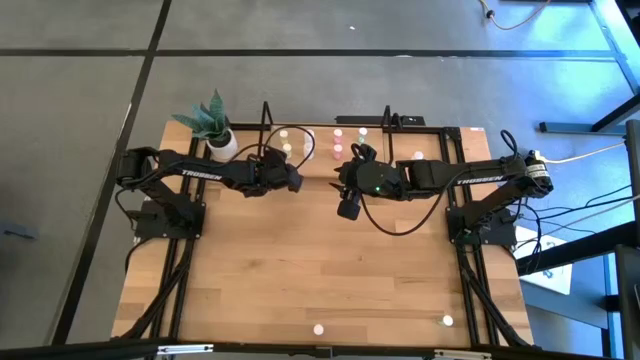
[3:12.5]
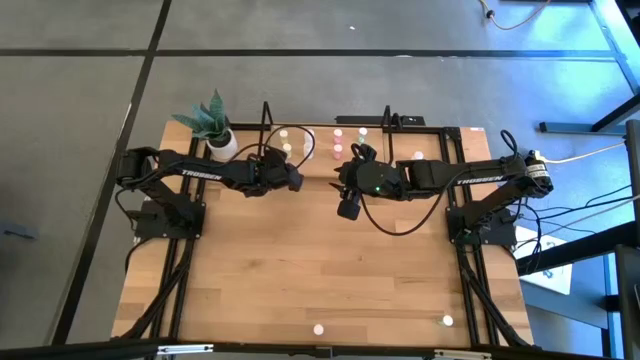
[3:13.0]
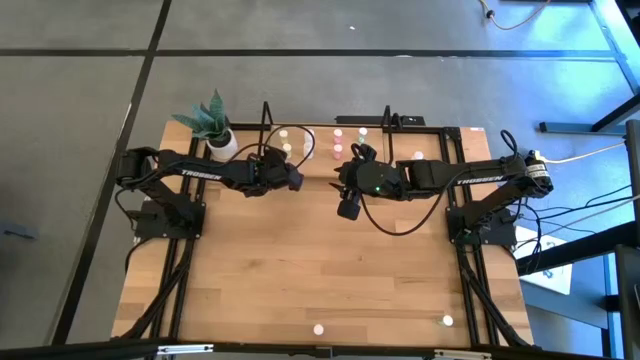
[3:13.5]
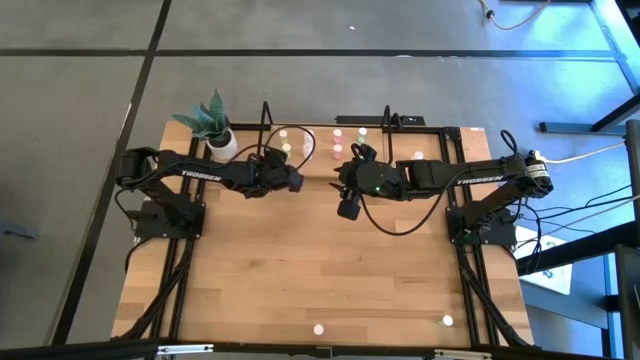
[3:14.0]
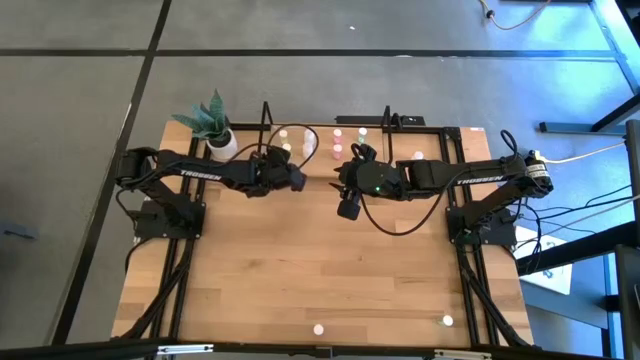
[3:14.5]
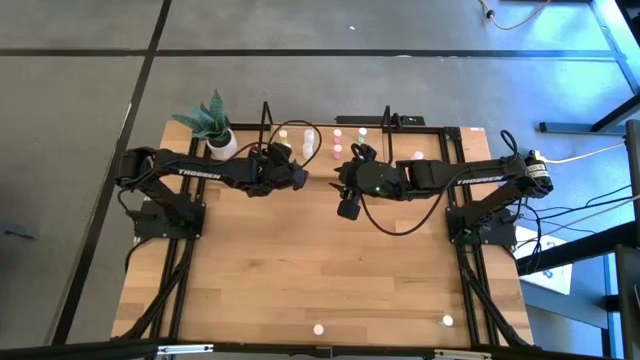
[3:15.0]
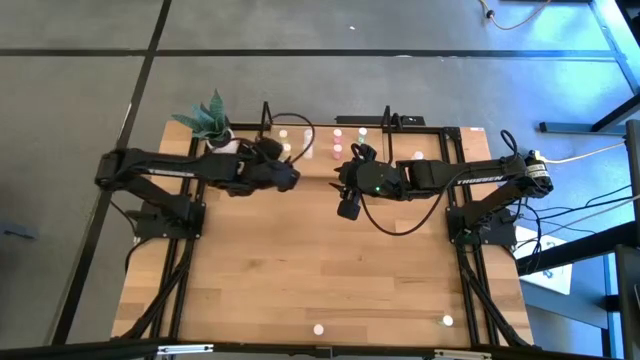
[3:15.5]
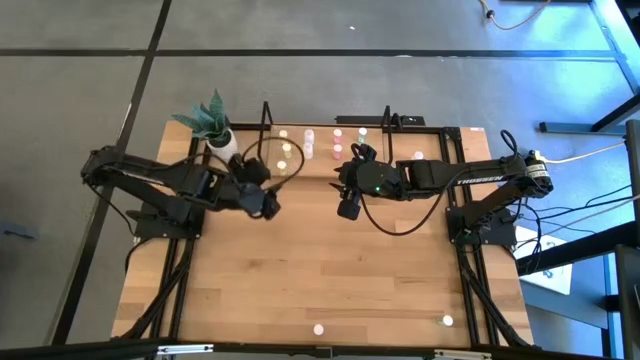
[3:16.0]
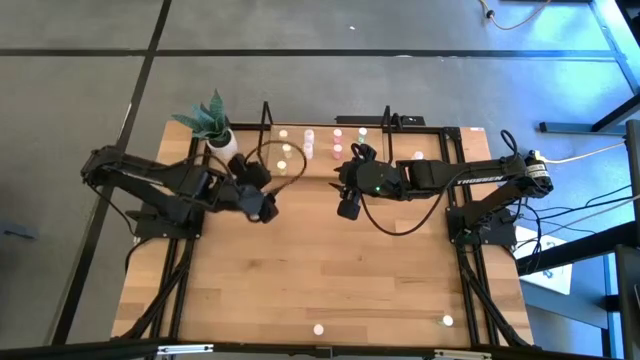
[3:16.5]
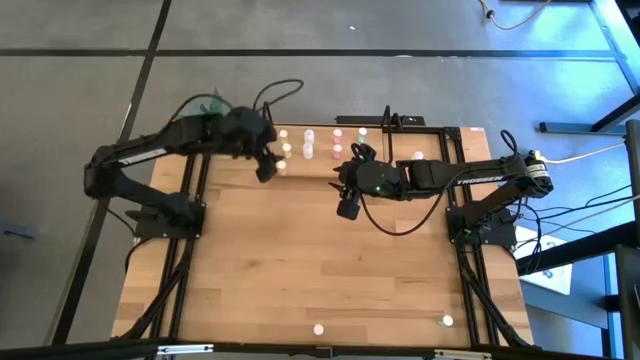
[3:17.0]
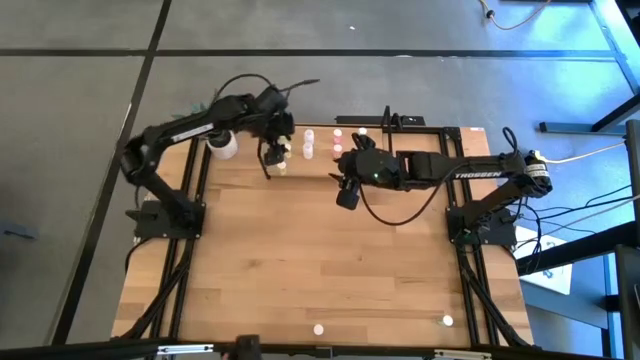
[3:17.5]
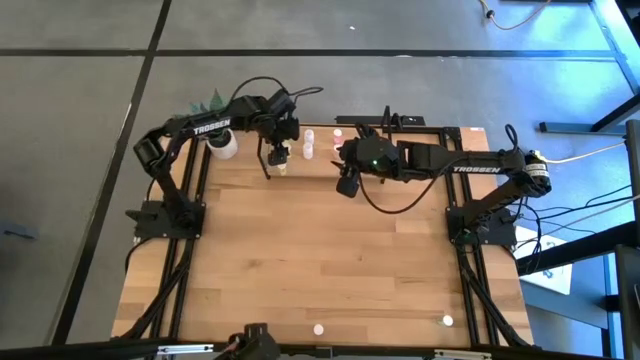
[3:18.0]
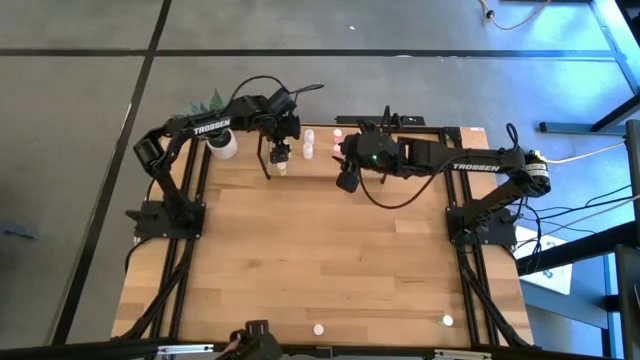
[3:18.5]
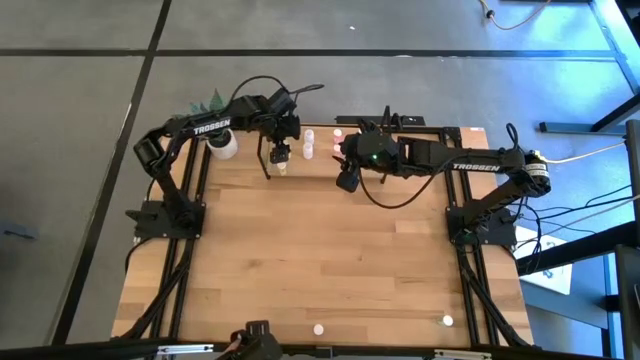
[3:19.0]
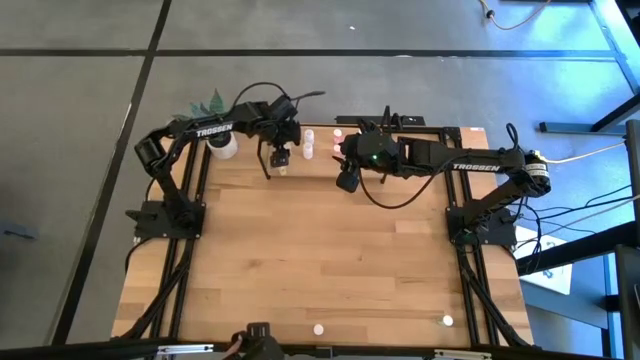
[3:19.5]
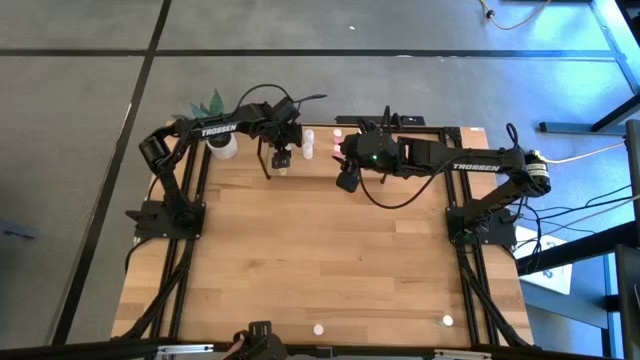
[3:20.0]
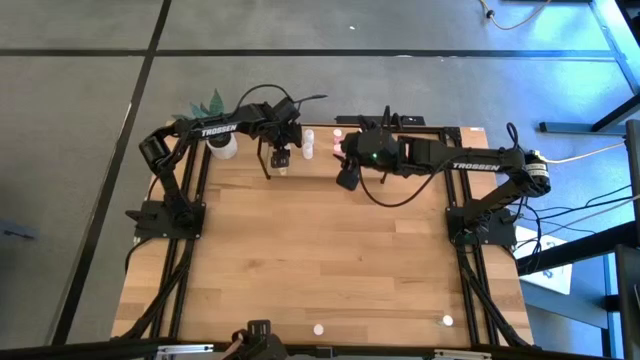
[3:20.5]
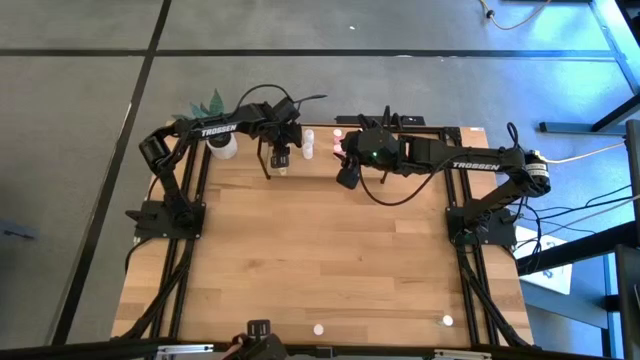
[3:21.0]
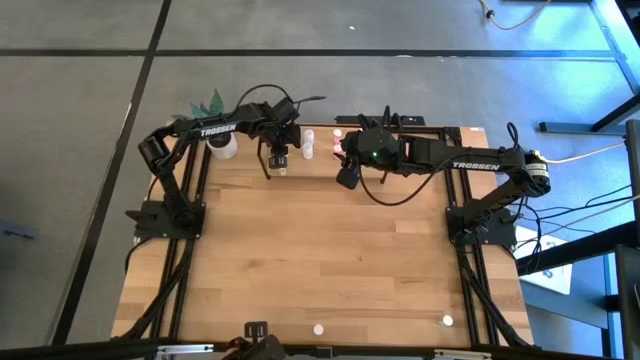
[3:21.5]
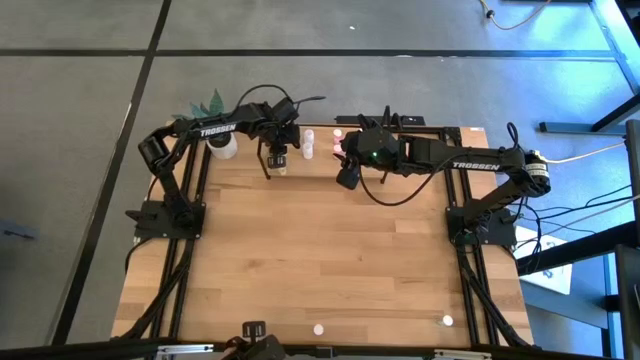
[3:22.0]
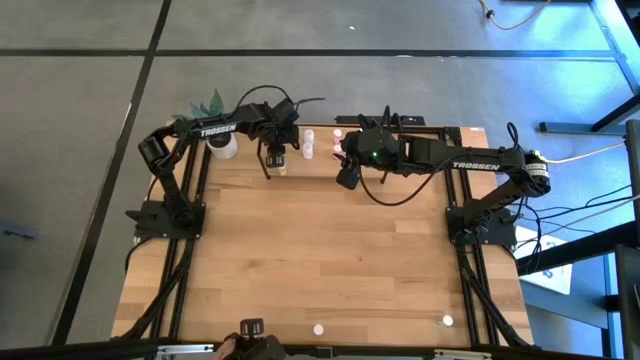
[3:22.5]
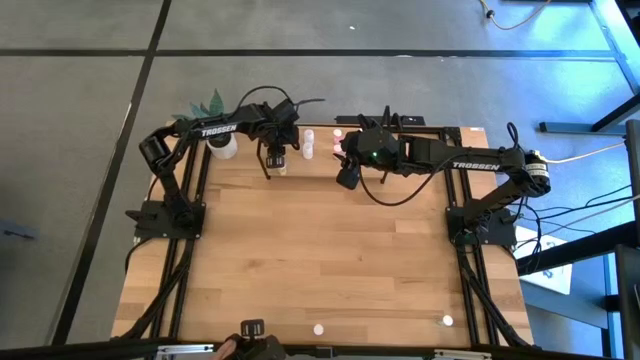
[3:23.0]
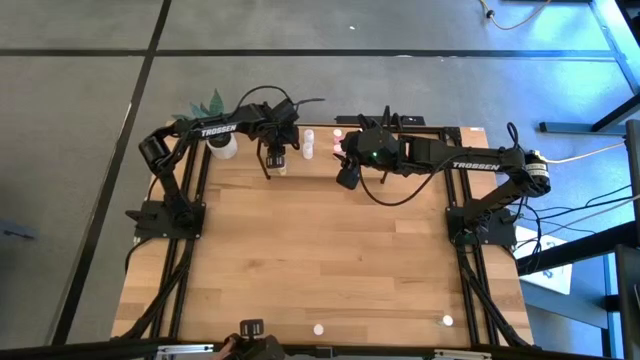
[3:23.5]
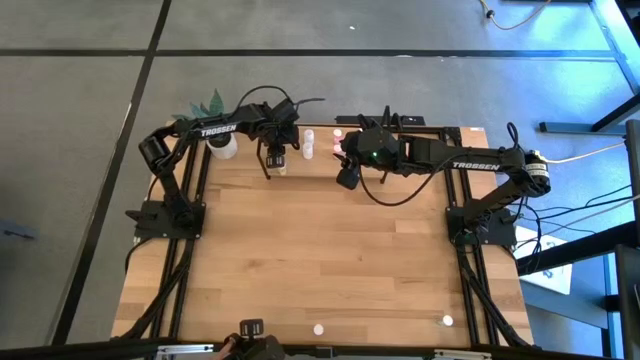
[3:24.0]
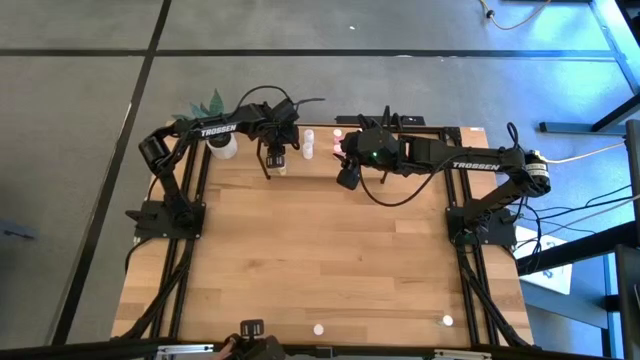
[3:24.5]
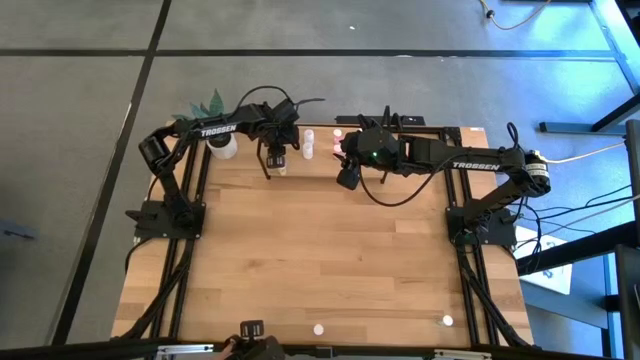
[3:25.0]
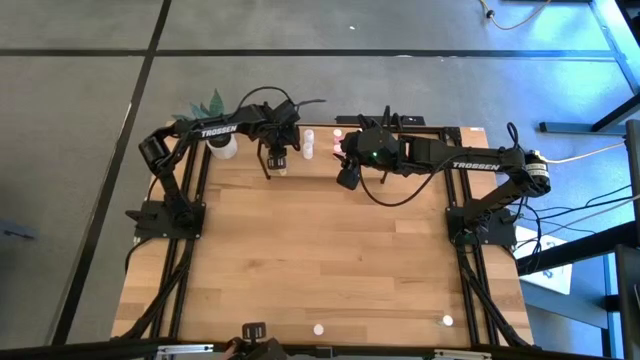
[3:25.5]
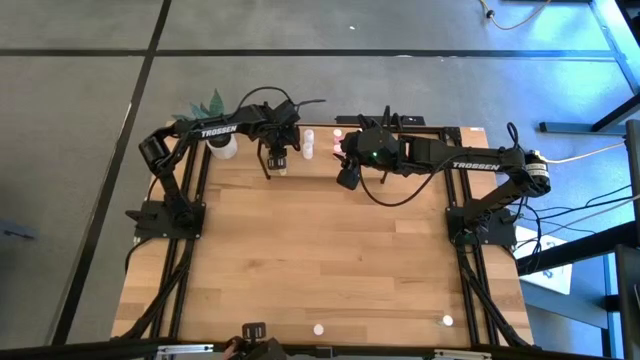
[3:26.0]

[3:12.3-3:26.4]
Task: Pick and place medicine bottles onto shelf by color
Adjust the yellow pill bottle on the shelf

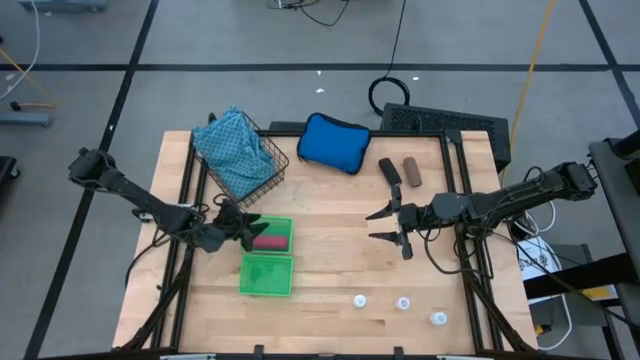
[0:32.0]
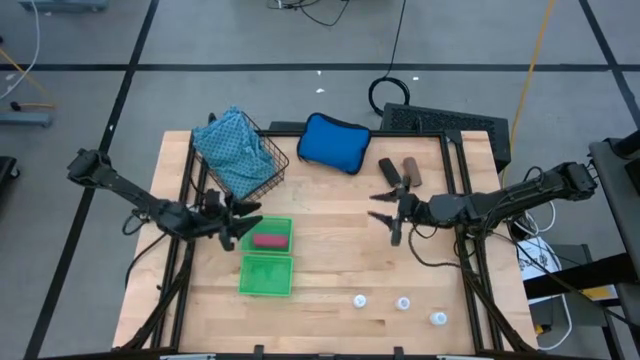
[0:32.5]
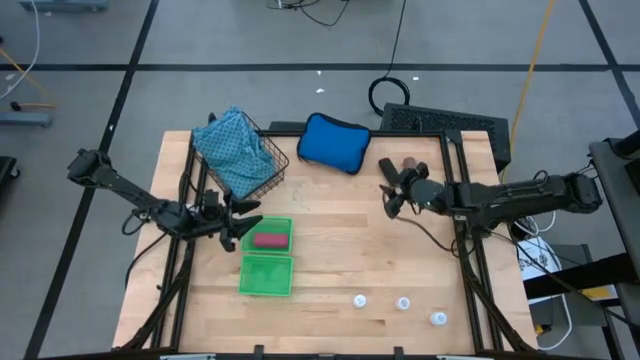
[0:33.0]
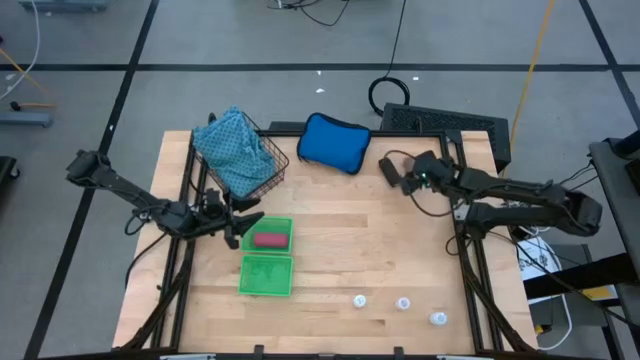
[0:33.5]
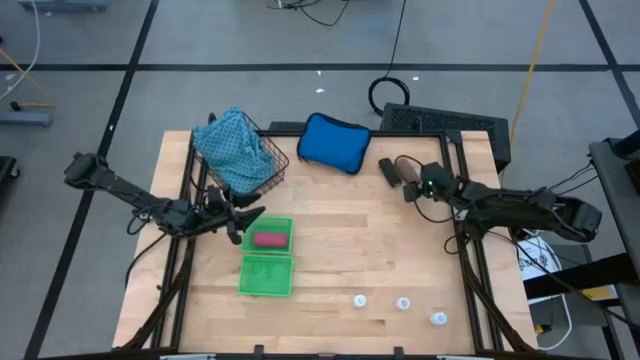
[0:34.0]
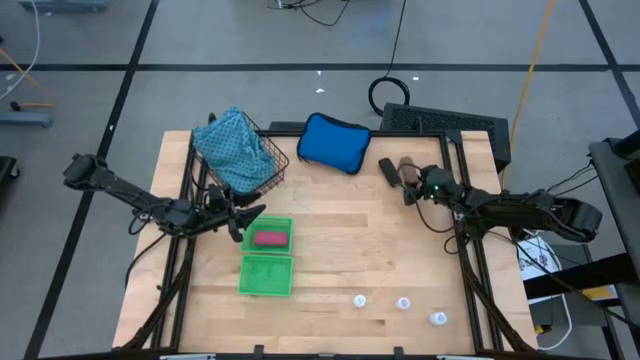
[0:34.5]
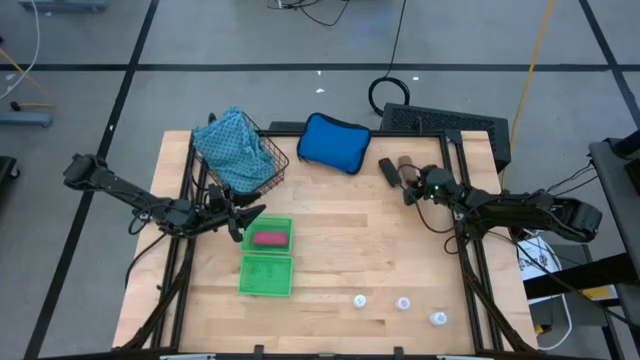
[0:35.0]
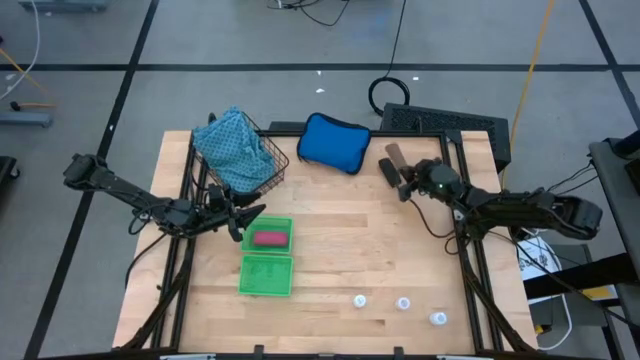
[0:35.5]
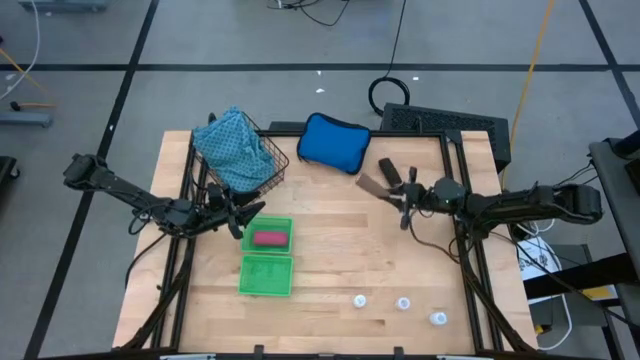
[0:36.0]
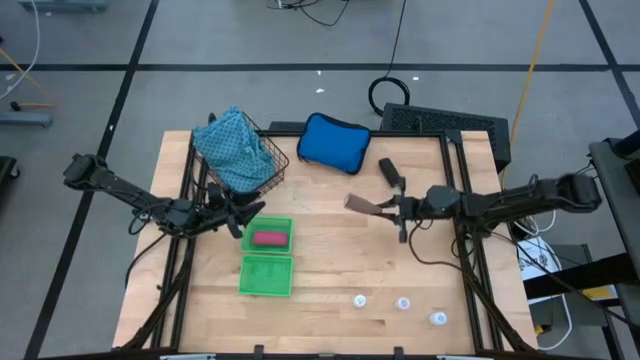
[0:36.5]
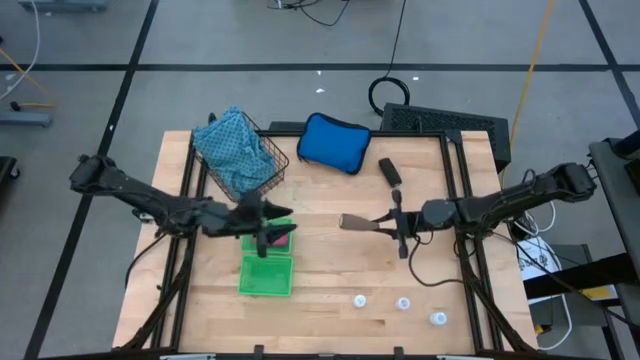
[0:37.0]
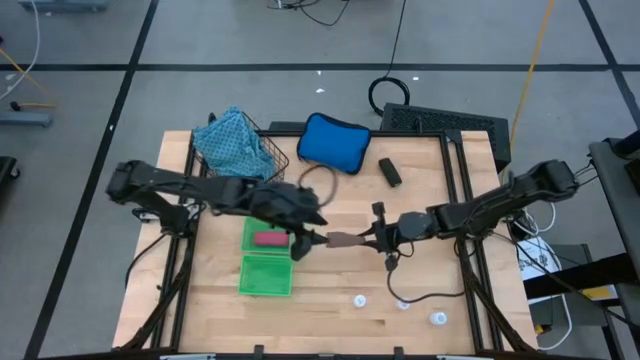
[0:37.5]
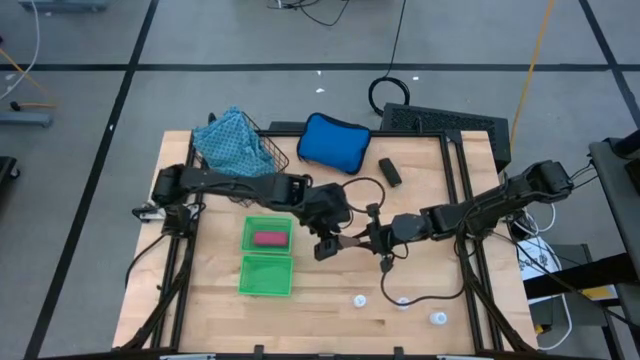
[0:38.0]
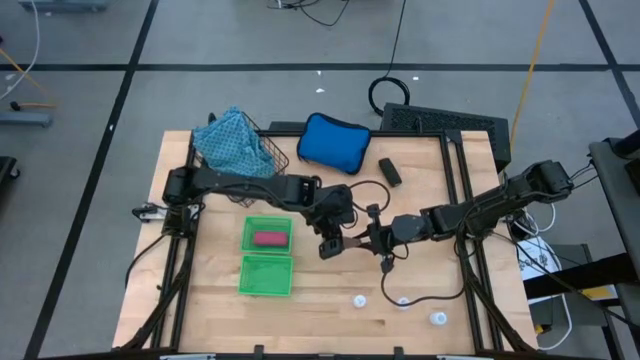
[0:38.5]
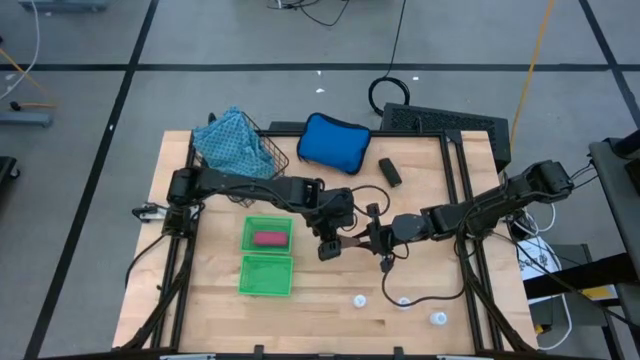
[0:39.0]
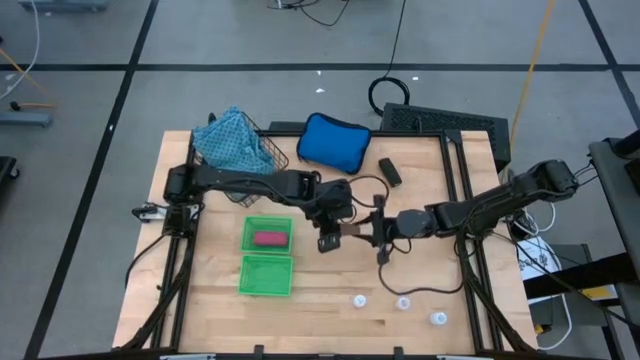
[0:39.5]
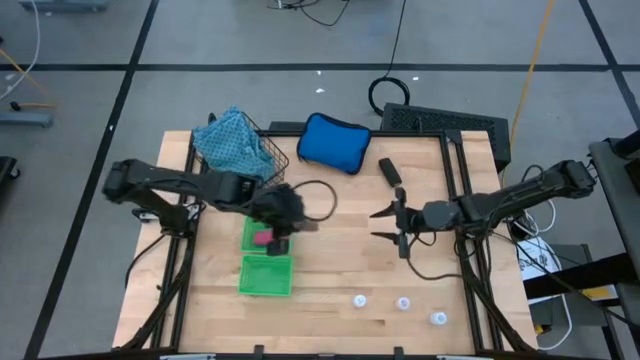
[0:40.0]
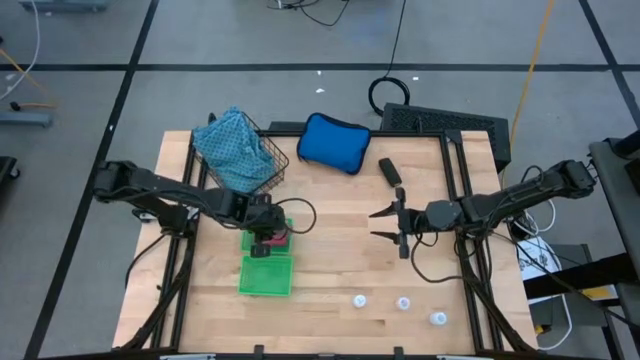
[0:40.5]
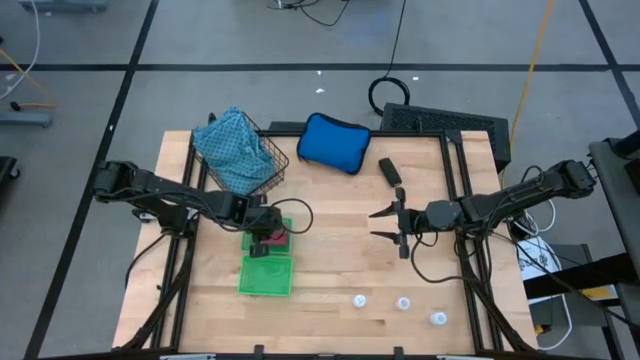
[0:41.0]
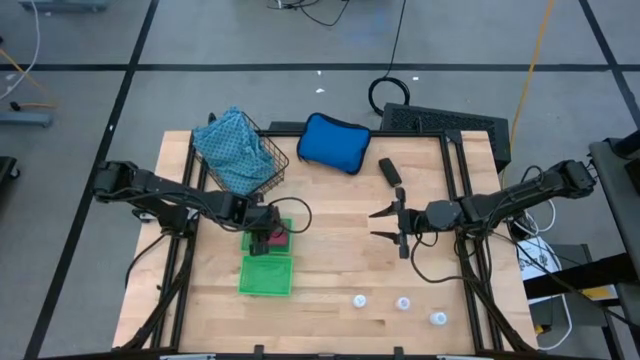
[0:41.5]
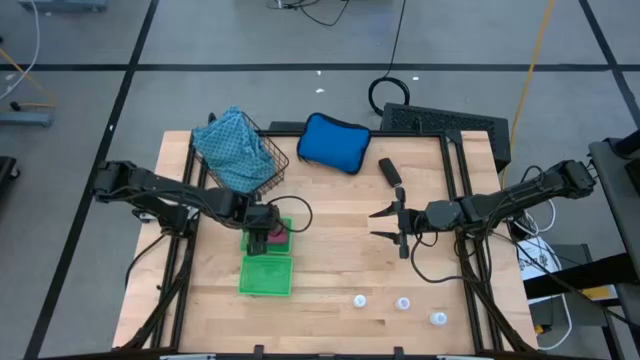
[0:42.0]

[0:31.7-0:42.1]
Task: Pick & Place Medicine items
Put the brown bandage into the top green basket
